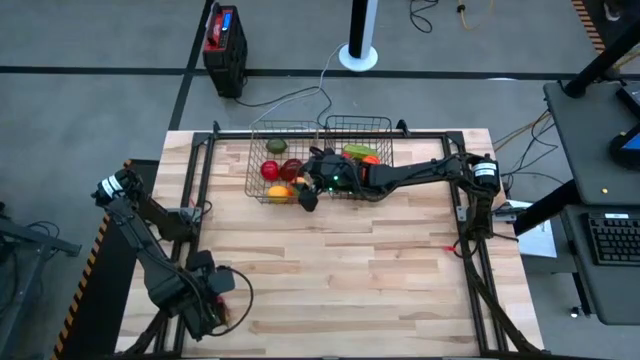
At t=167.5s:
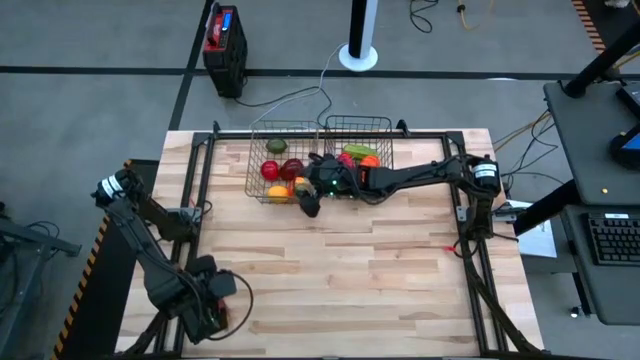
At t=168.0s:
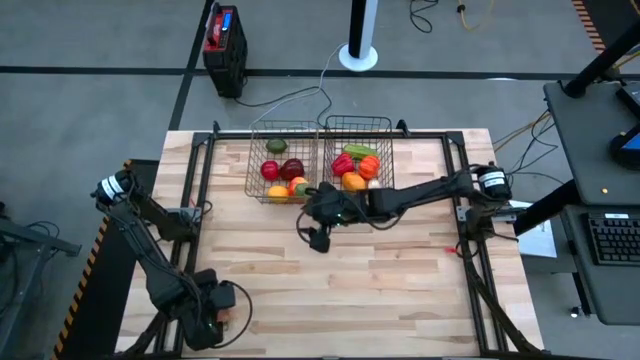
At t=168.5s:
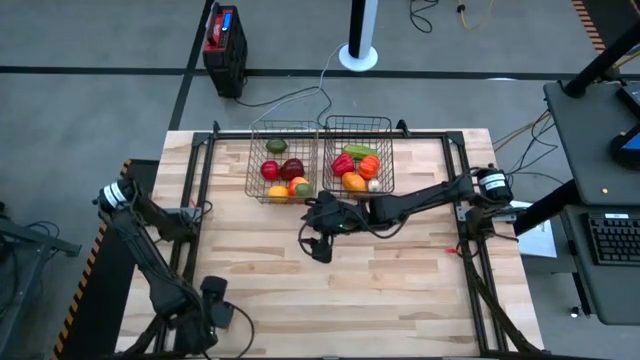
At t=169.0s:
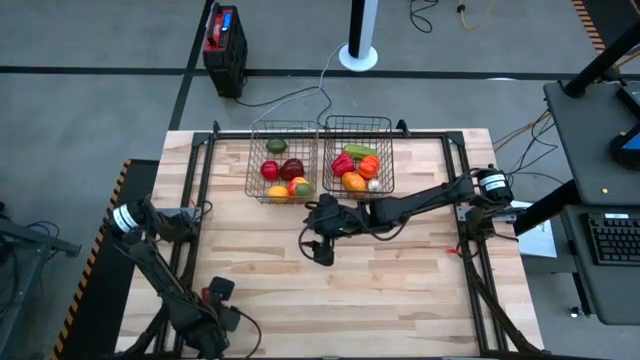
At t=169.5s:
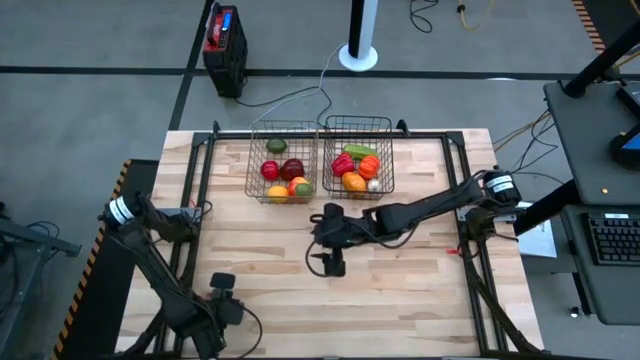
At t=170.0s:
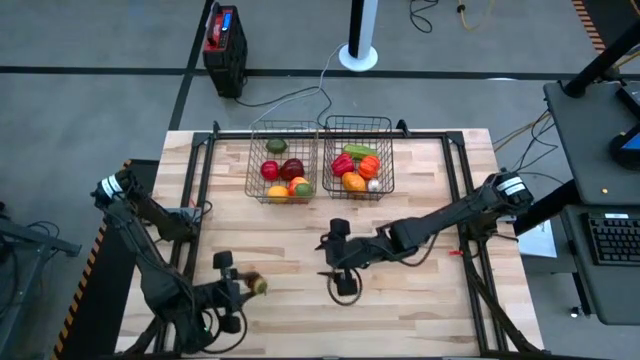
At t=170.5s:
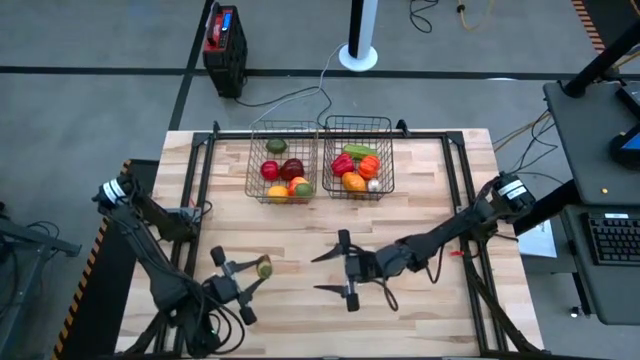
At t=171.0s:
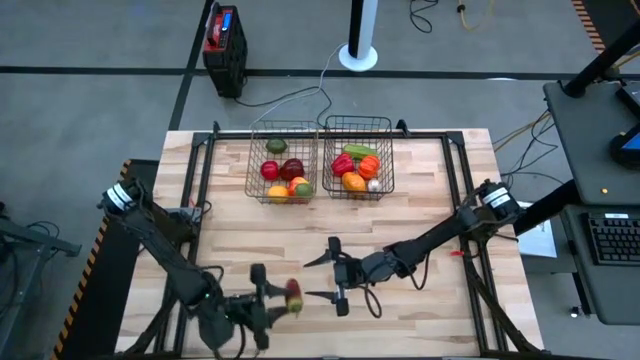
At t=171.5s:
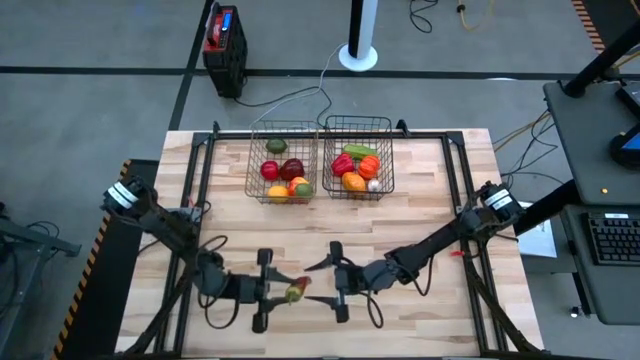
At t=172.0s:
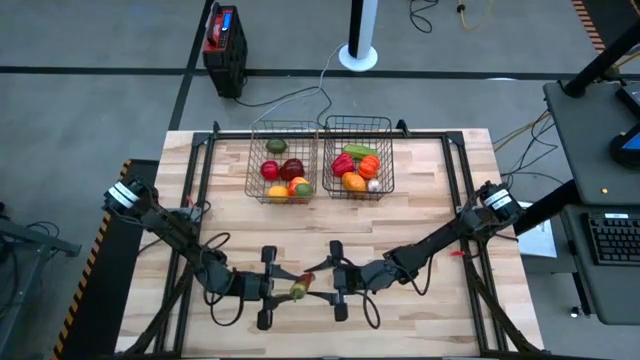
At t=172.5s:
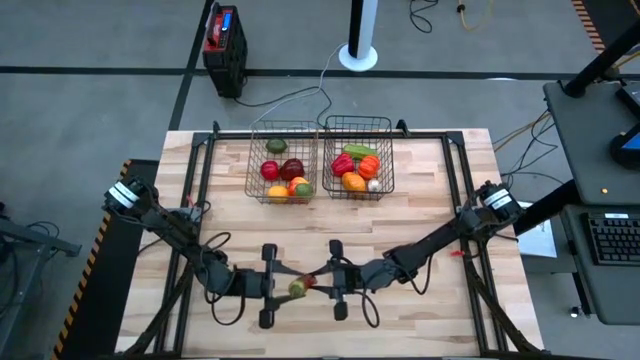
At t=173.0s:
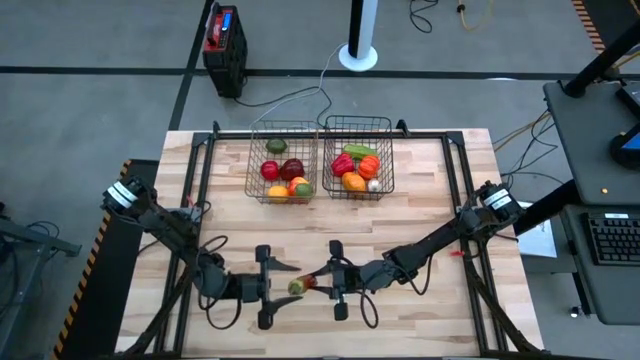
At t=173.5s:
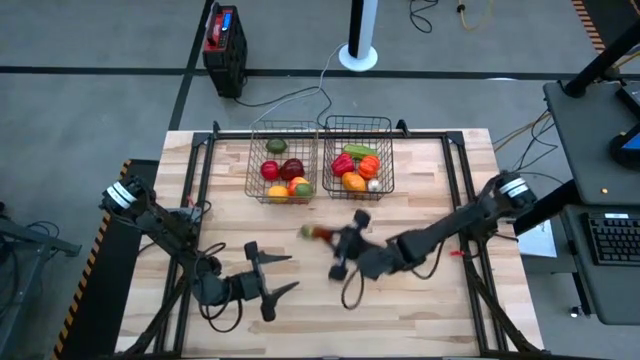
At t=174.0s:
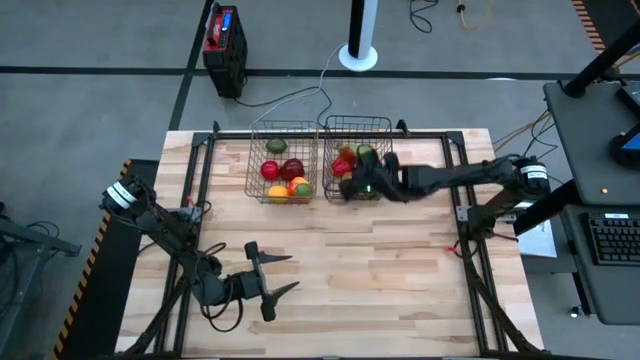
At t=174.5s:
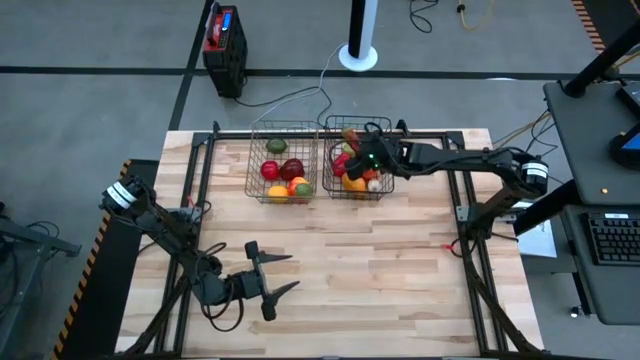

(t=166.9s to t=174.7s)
Task: Sort produce into baskets
Put the red chili pepper into the black wire basket

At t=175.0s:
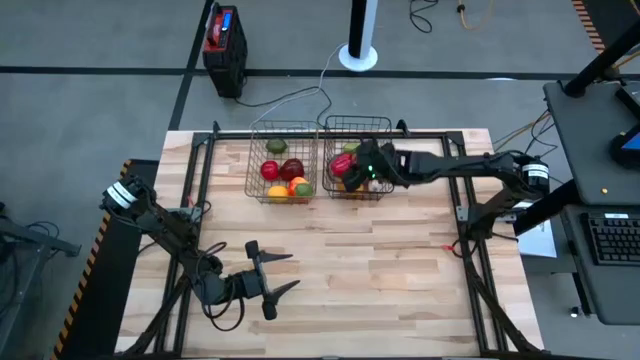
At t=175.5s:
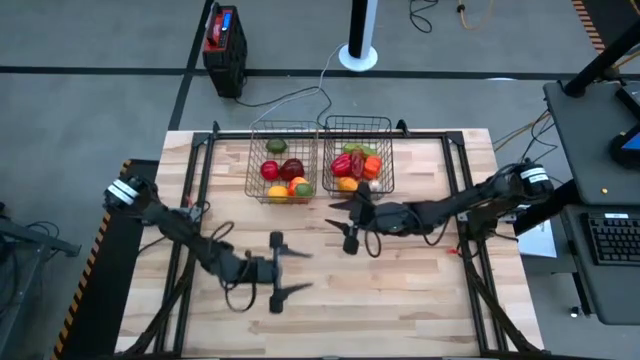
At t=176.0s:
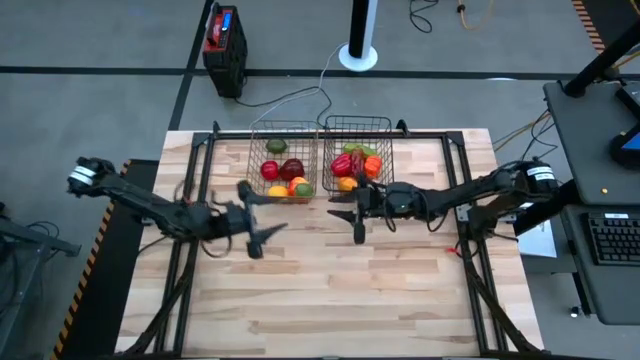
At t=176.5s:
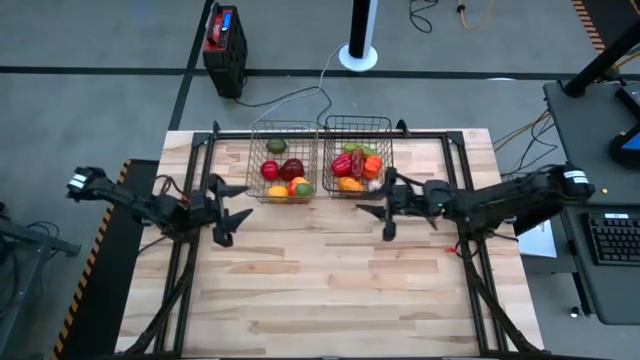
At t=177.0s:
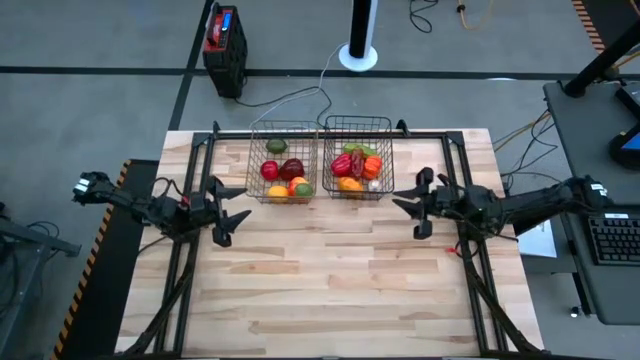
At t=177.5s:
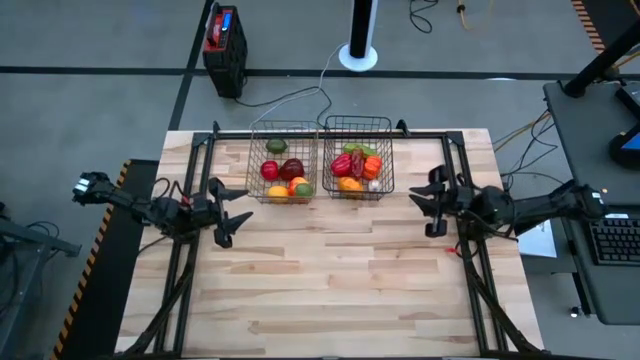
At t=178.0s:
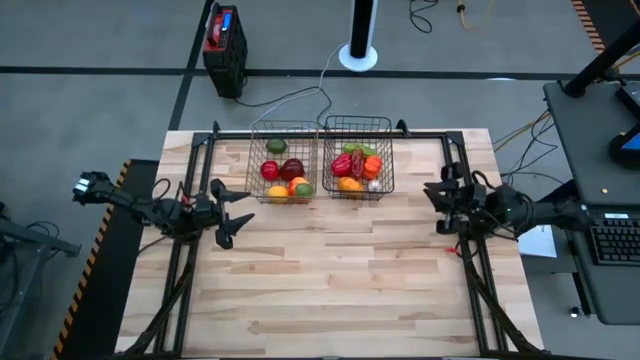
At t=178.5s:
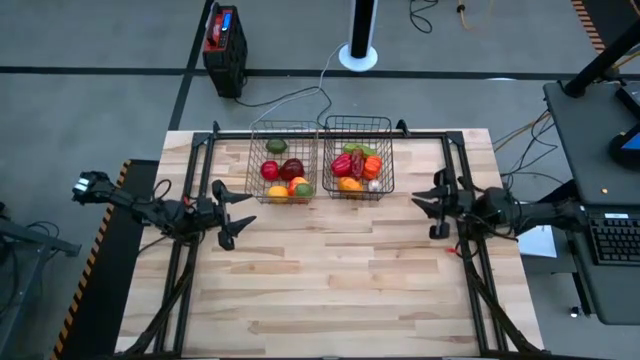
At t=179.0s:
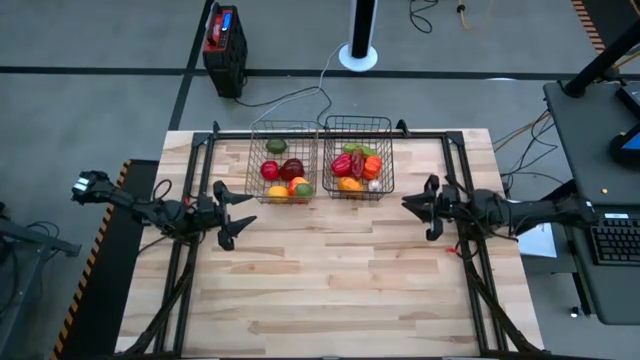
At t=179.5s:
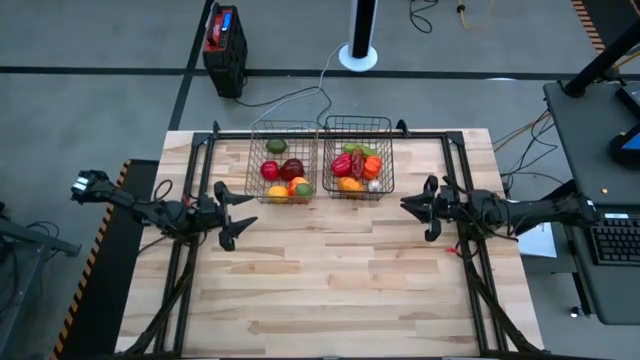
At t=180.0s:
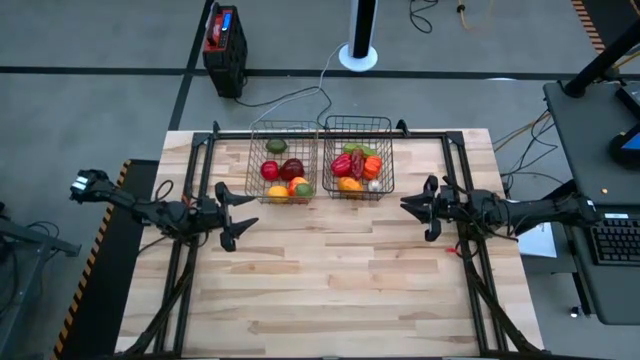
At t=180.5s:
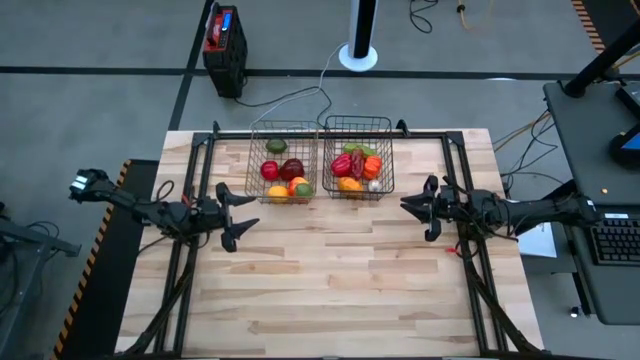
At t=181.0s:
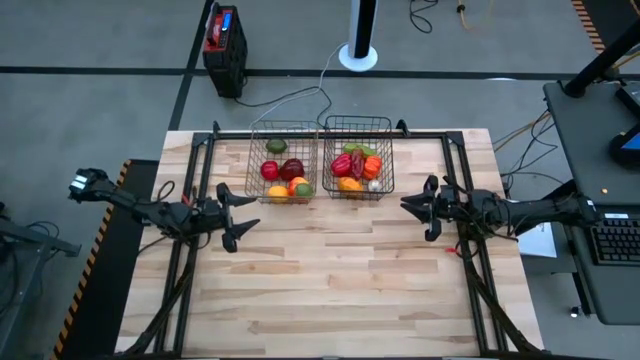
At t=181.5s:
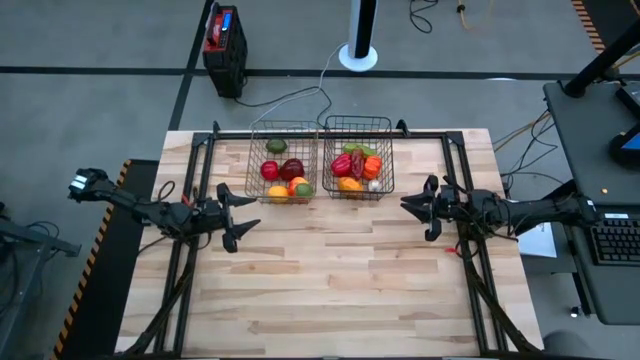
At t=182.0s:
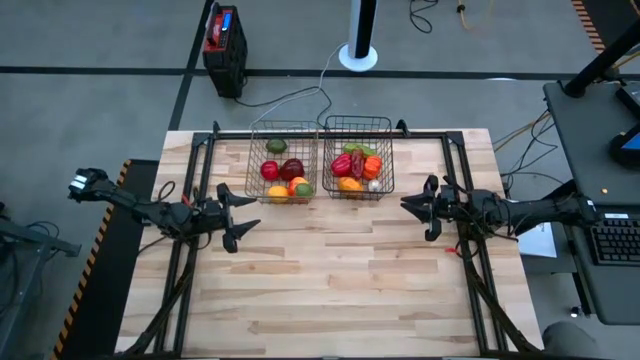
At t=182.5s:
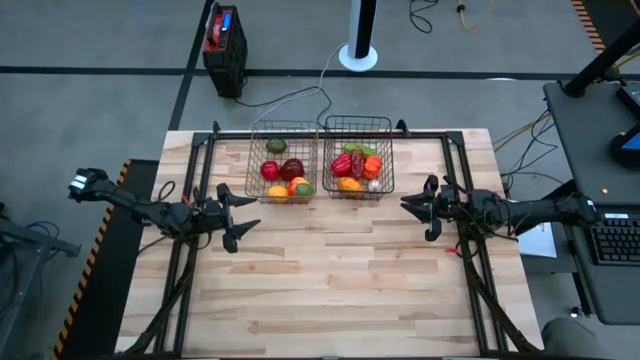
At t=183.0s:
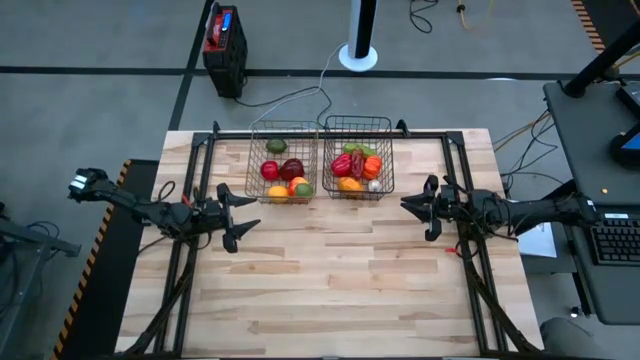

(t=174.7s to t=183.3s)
Return to Home Position

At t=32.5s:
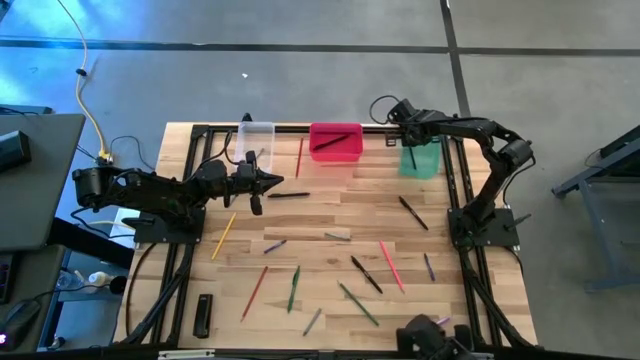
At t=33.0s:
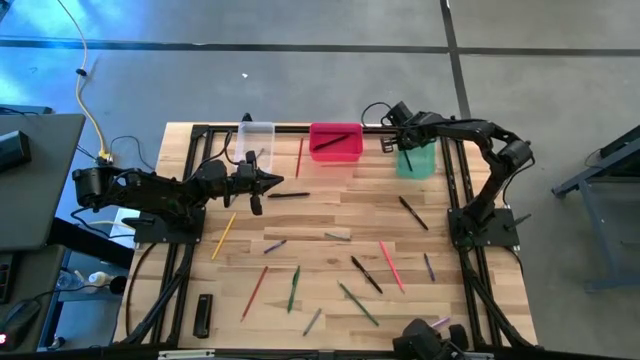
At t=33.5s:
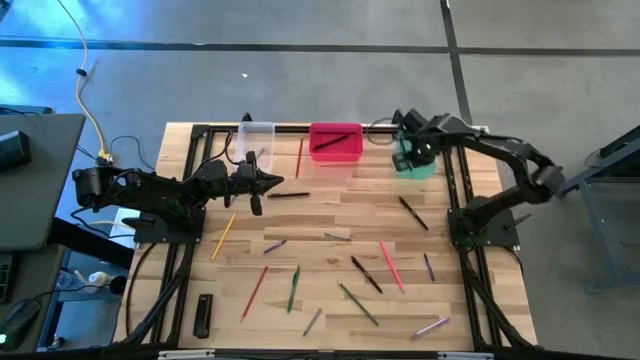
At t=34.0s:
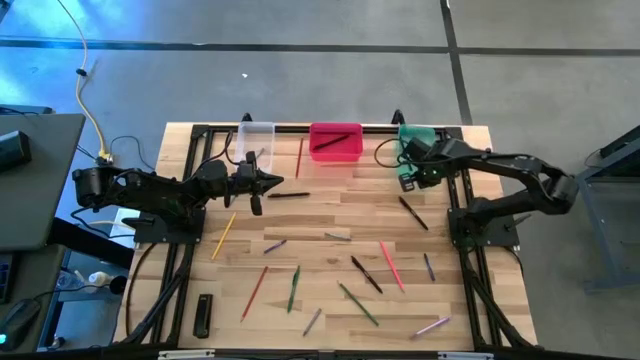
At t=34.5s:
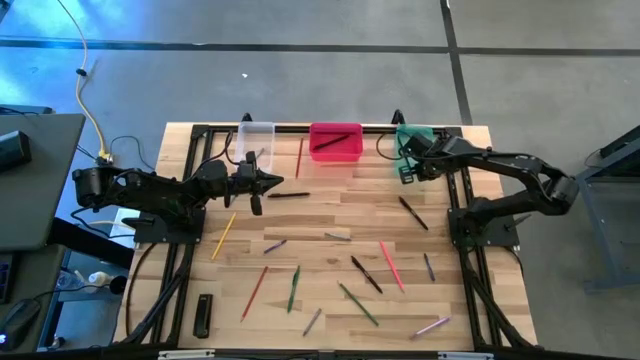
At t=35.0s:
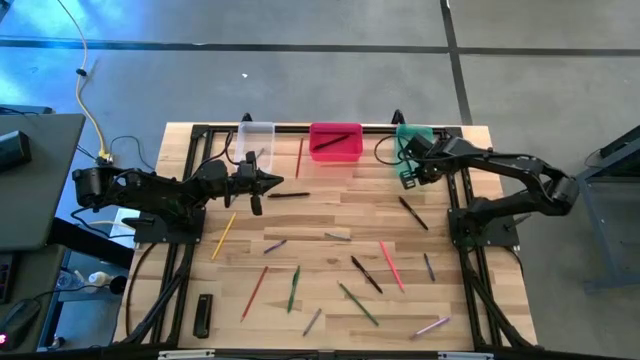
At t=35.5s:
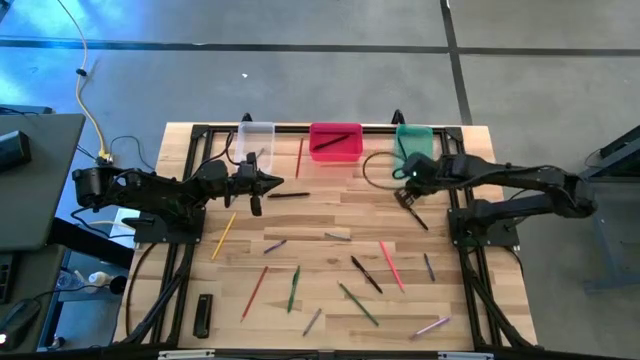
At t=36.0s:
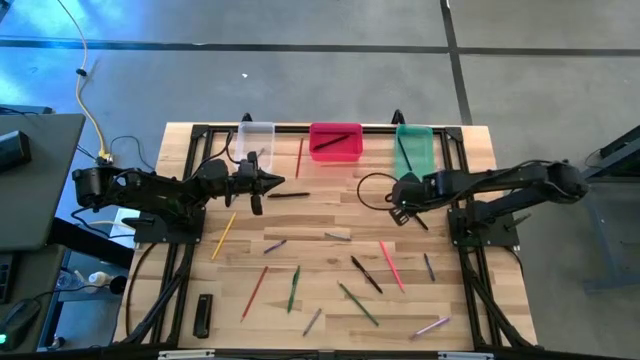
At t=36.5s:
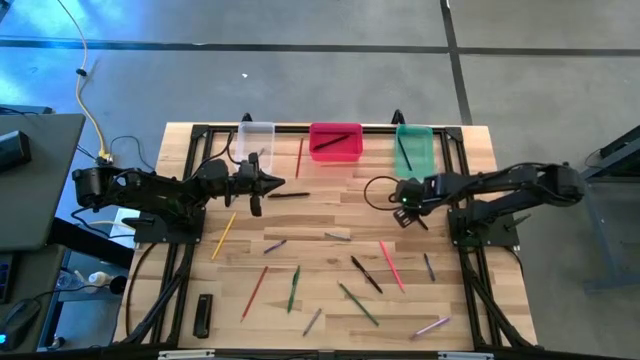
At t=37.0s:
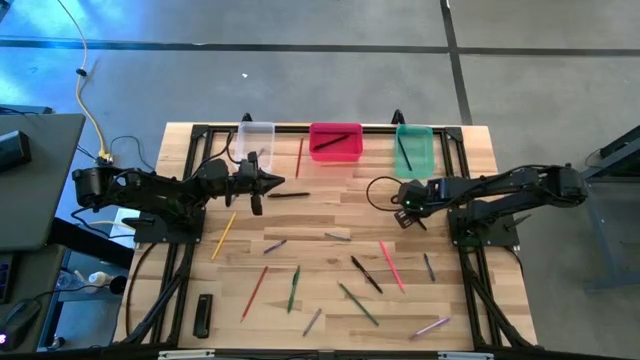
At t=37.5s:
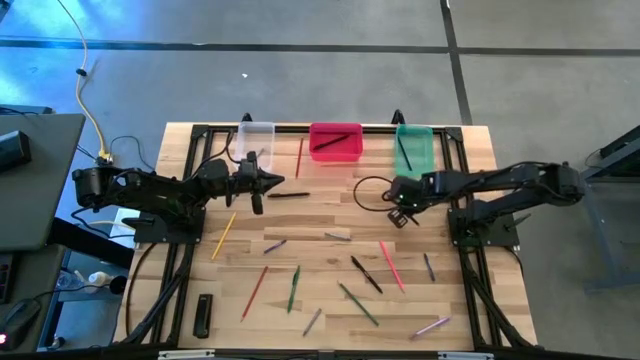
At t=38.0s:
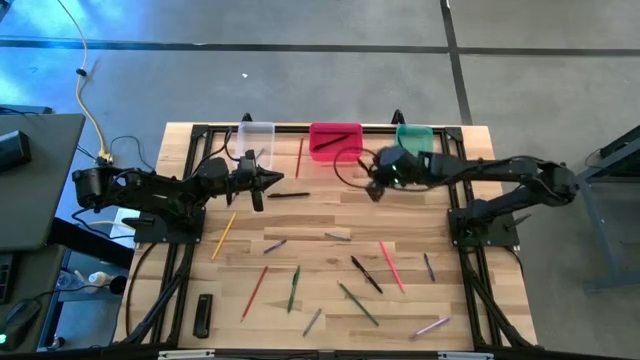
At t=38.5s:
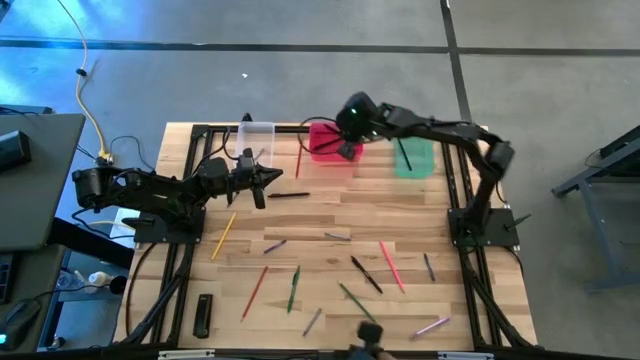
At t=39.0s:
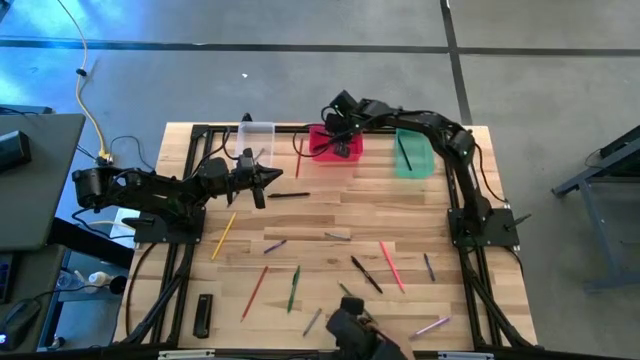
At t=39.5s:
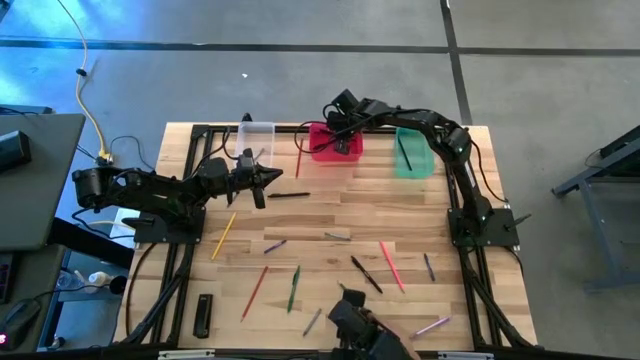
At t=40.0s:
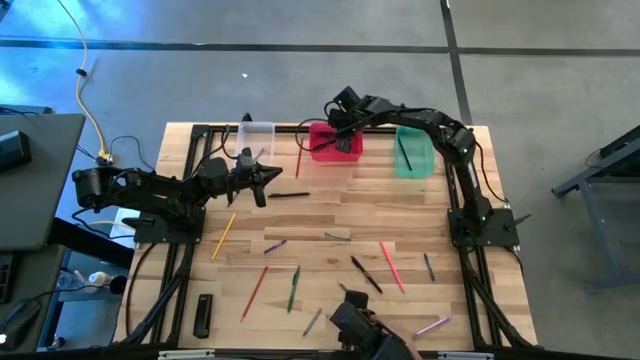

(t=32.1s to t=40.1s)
Task: Sort crayons/erasers/pens/pencils in bins
Put the black pen into the red bin
